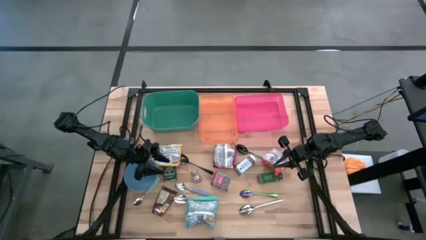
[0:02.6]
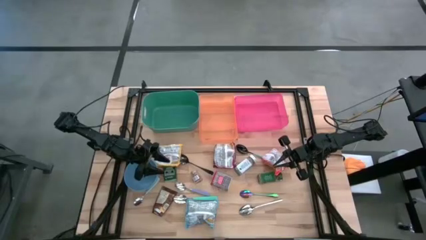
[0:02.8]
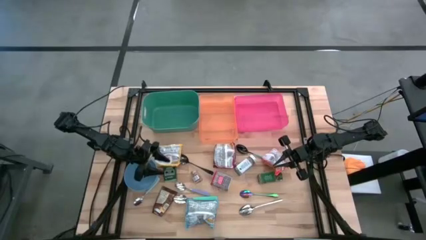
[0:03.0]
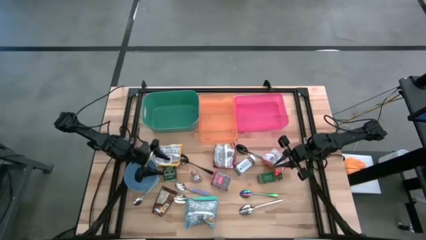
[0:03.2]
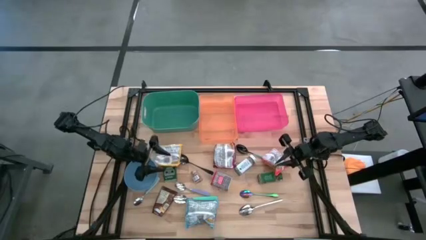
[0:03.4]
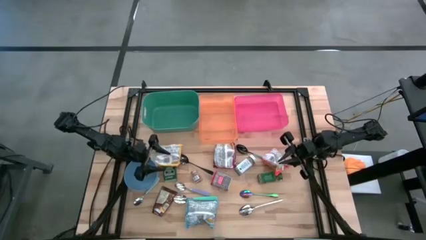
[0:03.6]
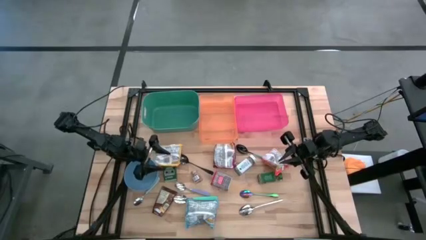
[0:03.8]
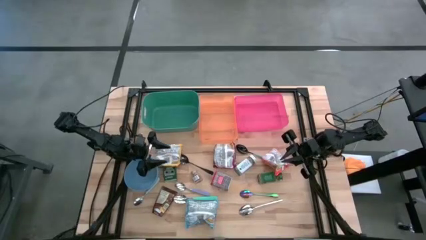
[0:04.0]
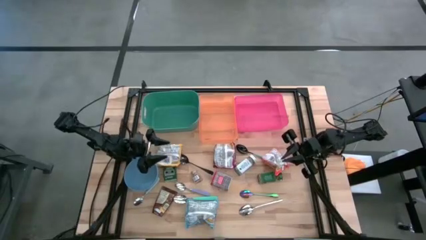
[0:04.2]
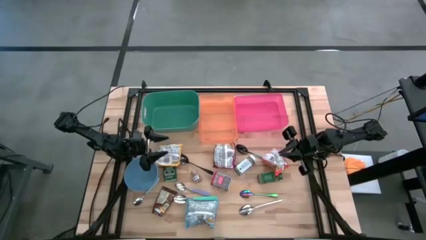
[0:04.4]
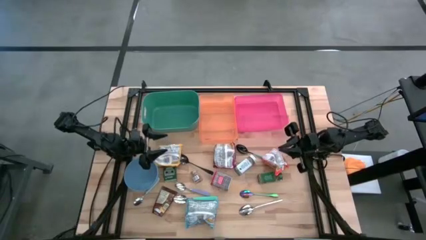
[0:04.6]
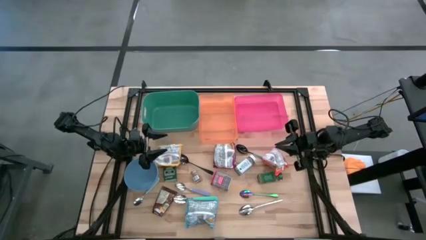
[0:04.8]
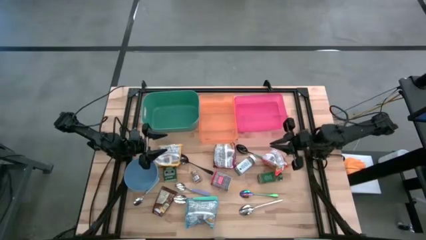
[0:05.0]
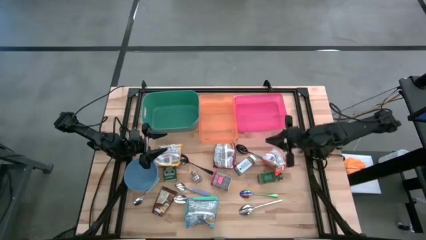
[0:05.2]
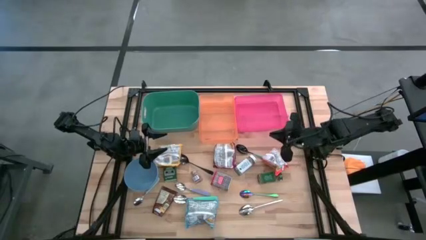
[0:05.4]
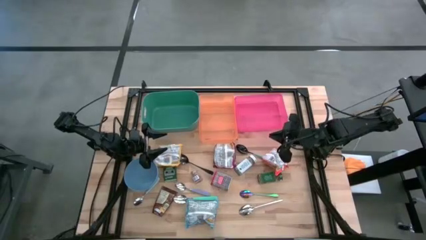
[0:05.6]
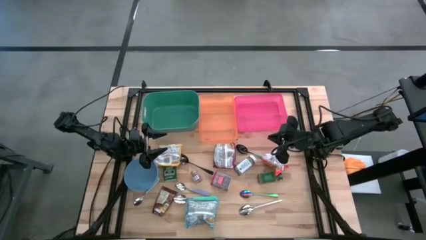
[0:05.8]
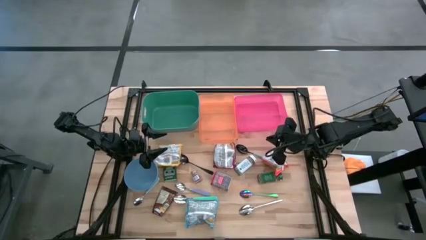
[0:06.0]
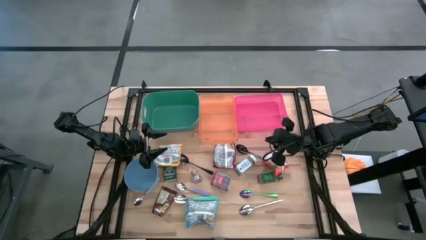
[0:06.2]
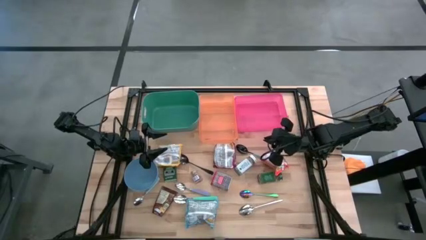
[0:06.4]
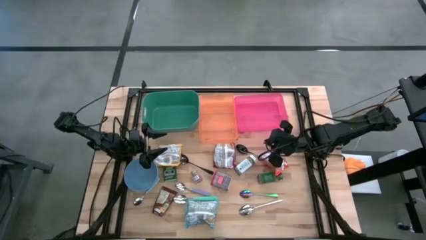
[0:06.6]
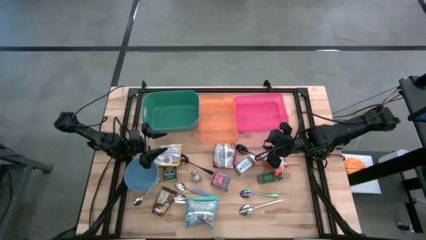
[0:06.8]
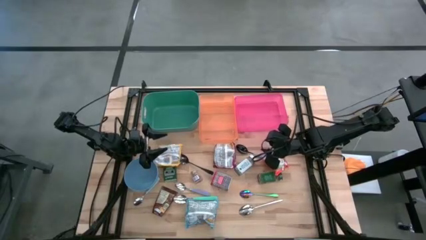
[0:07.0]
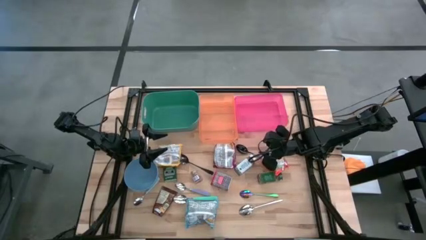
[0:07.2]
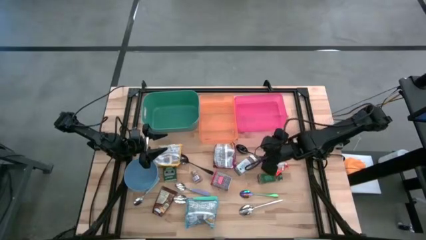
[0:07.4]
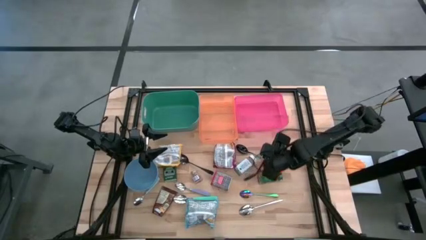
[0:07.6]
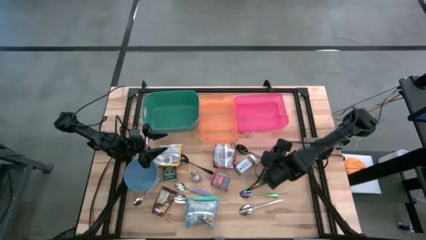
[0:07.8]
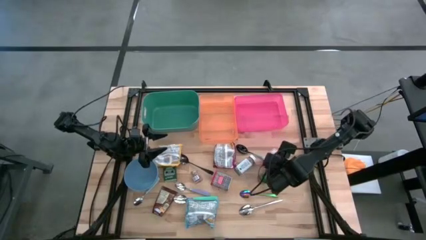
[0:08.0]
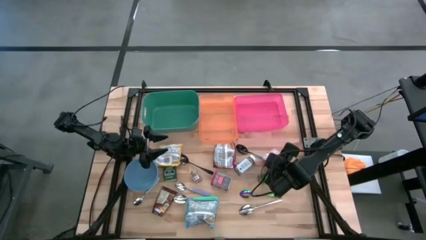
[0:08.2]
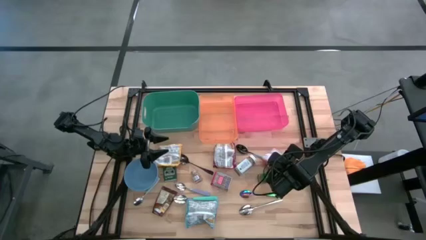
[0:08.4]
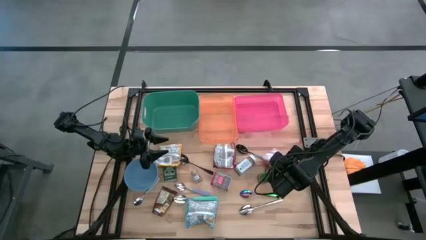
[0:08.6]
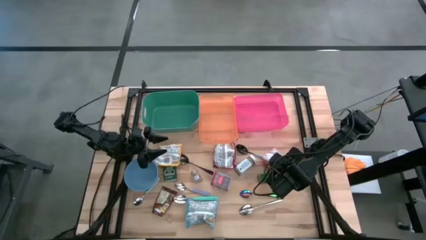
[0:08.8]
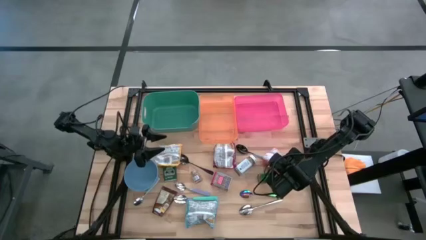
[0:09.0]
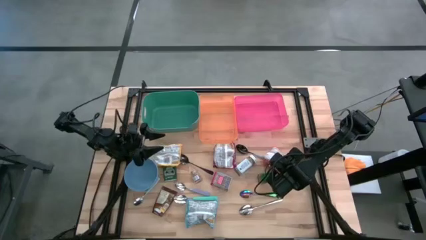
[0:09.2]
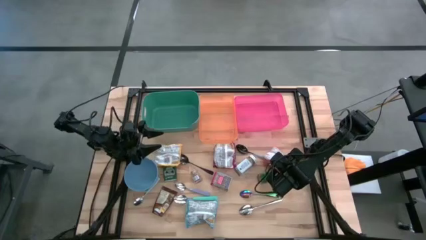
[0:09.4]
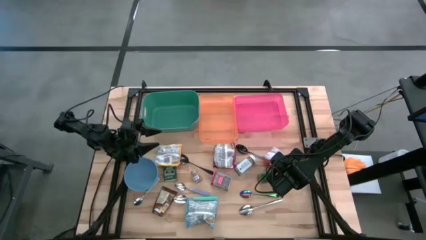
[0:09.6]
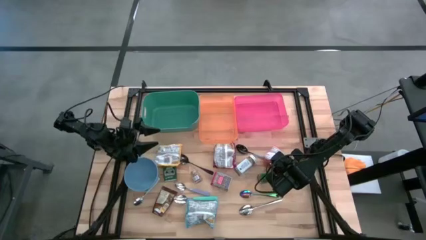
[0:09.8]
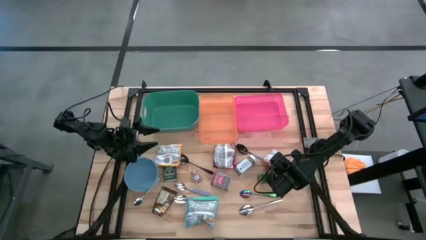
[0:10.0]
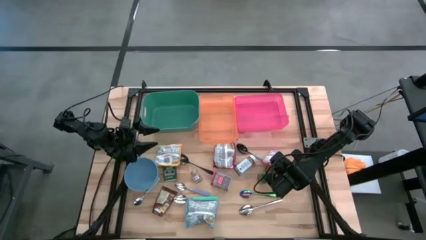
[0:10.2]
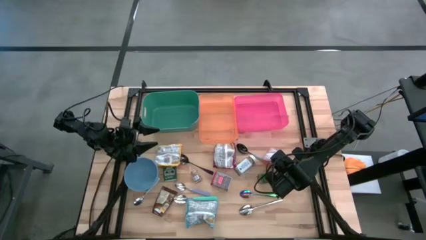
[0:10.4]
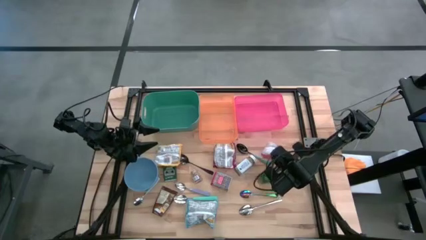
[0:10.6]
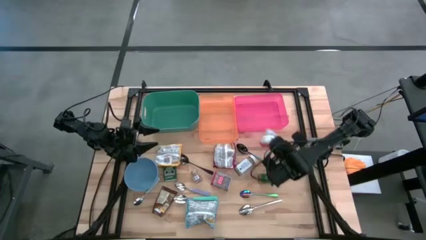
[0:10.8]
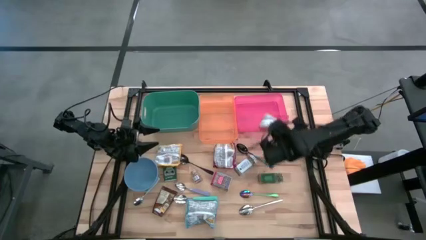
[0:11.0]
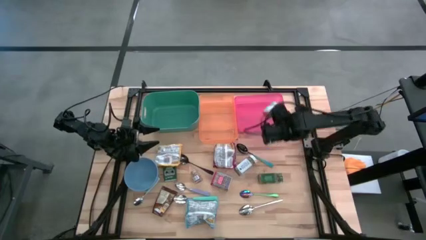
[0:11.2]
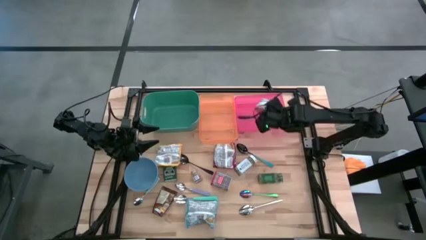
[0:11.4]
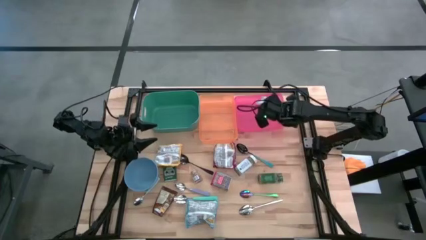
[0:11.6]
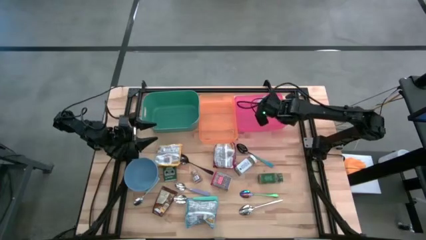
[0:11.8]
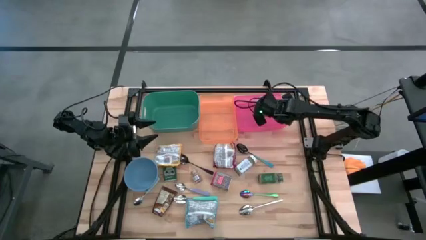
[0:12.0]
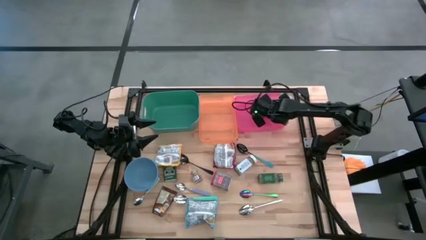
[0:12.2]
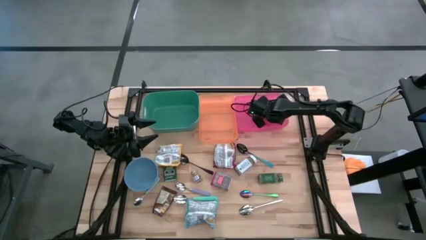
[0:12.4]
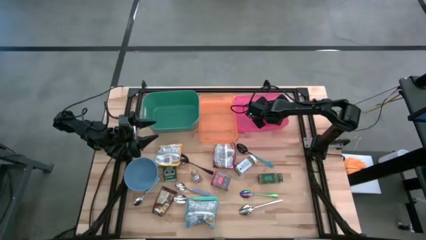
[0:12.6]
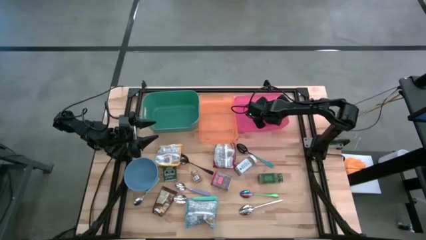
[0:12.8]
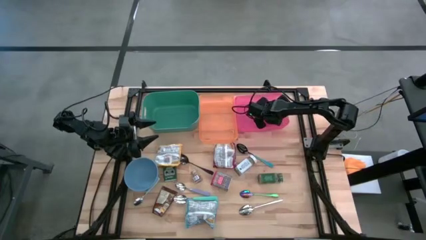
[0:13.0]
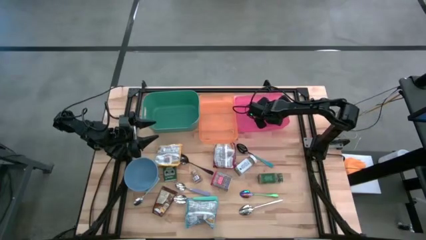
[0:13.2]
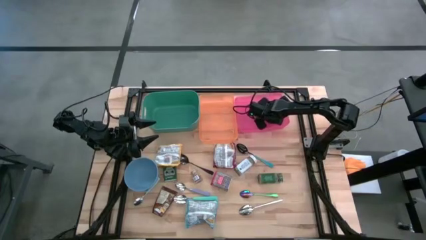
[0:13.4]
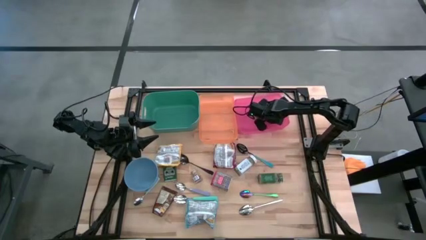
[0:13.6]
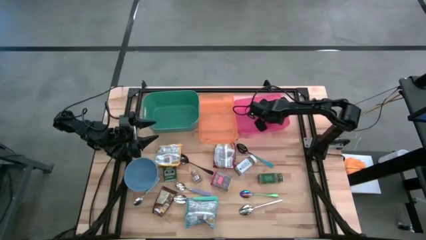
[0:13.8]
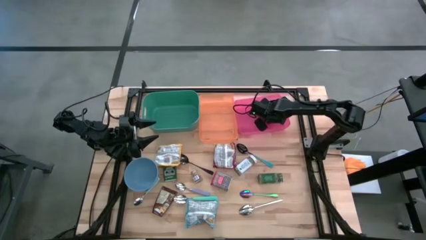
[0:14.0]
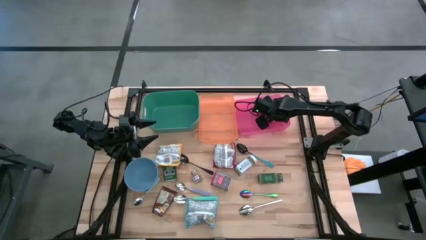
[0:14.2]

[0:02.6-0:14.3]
Put the orange noodle pack into the pink bin

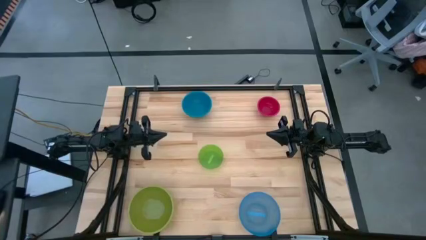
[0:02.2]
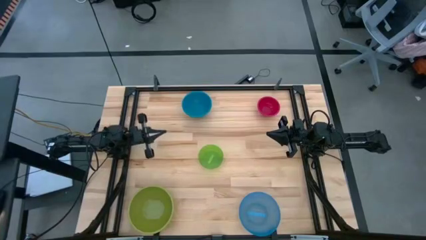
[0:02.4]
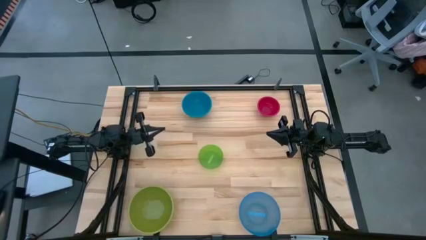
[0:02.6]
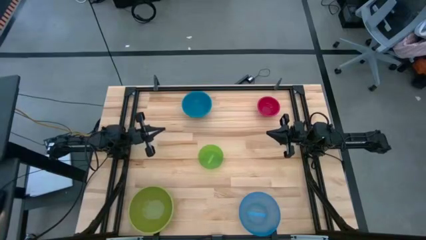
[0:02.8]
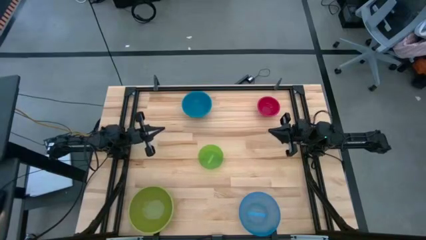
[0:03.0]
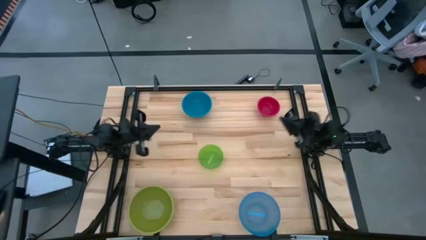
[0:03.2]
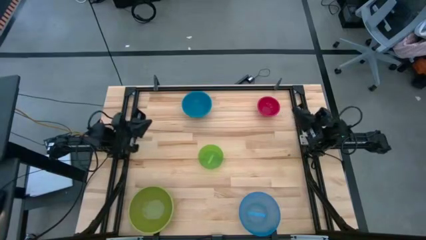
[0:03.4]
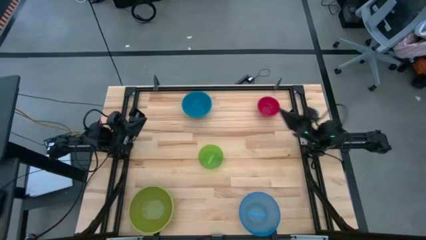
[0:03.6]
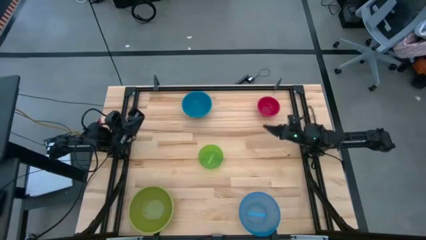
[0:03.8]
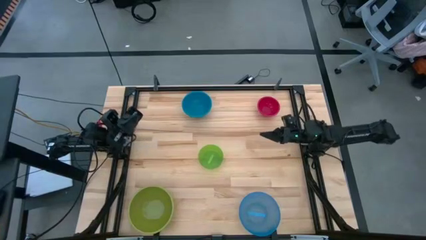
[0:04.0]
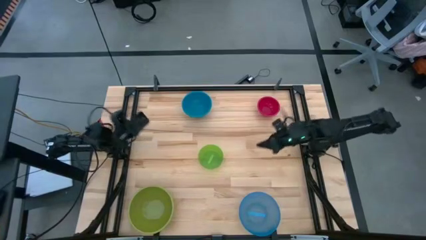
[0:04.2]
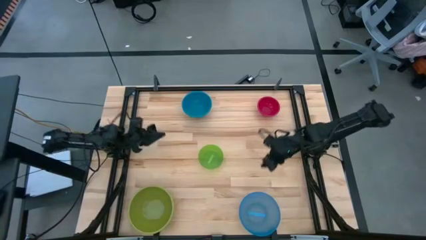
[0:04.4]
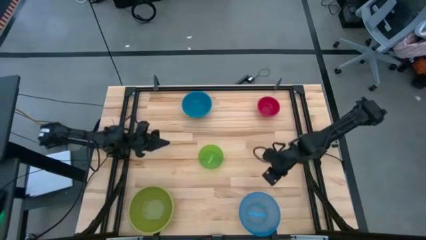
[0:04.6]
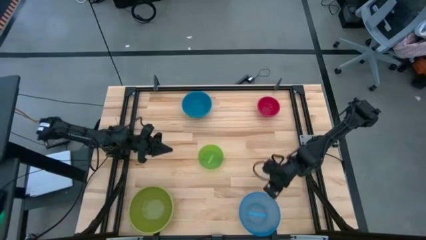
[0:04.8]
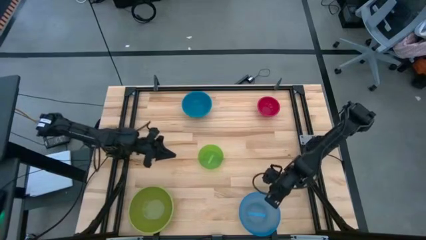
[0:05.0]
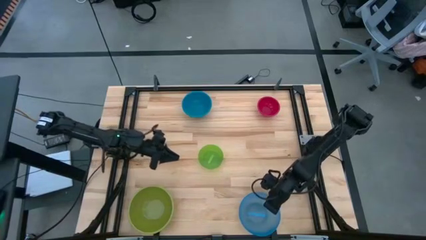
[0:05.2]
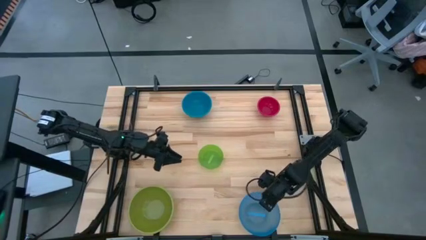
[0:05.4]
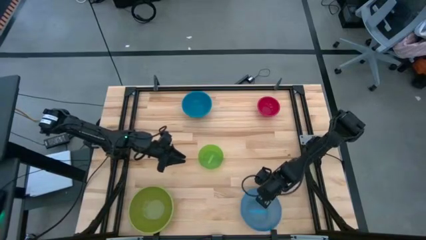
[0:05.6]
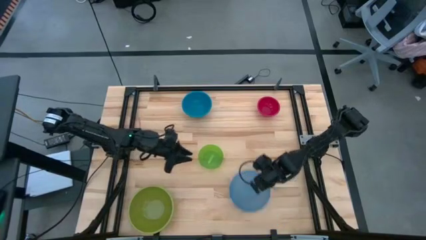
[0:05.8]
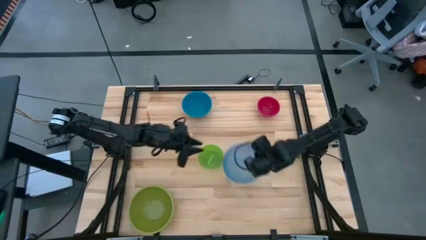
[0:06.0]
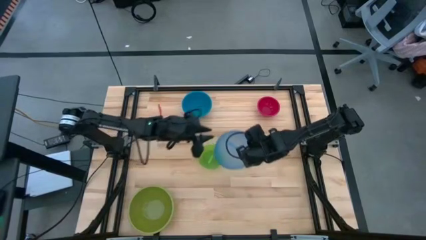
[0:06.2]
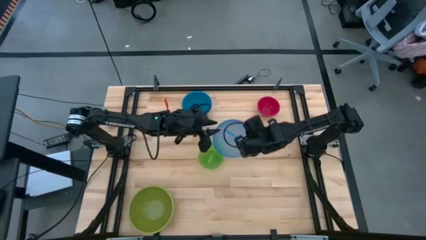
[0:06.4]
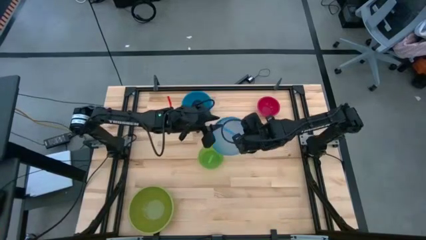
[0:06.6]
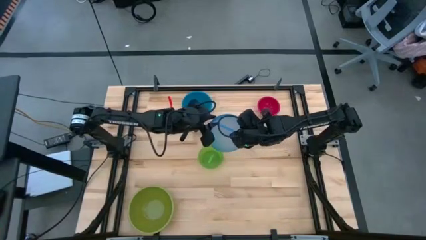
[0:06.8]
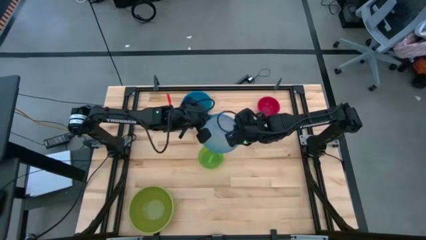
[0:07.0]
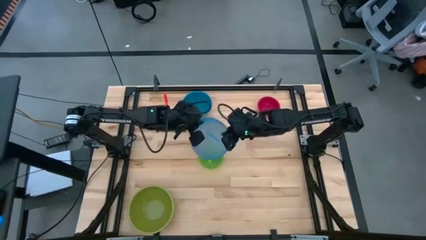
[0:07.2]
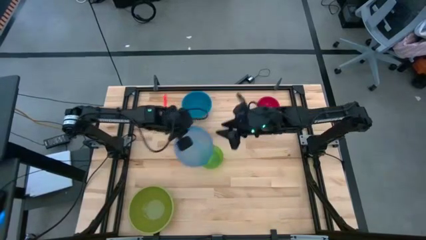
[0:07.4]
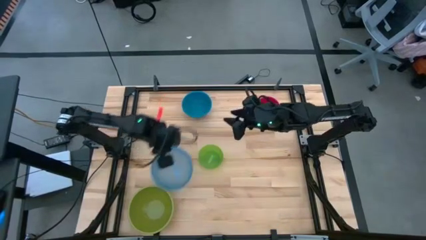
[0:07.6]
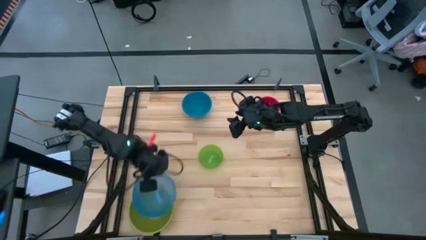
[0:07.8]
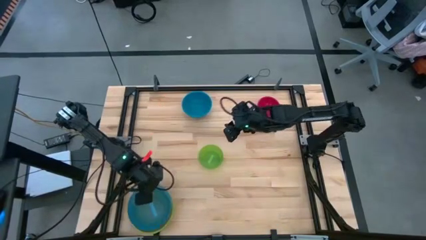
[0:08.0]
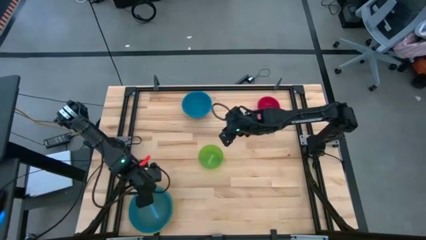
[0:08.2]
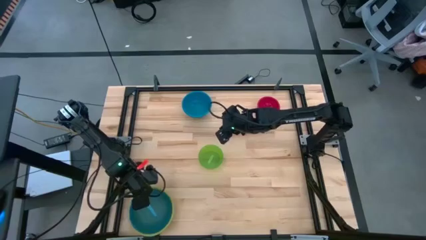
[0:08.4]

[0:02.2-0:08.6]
Stack the light blue bowl on top of the green bowl
